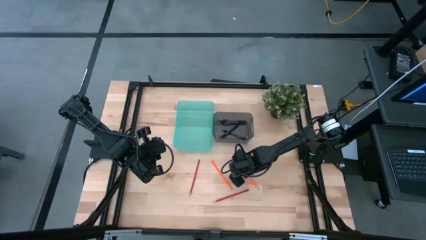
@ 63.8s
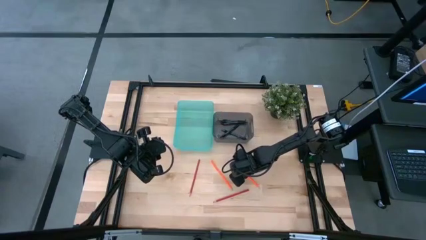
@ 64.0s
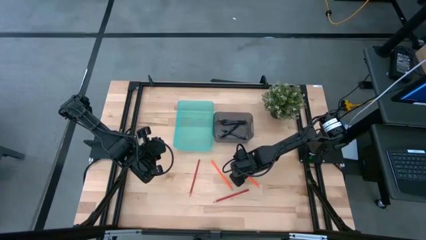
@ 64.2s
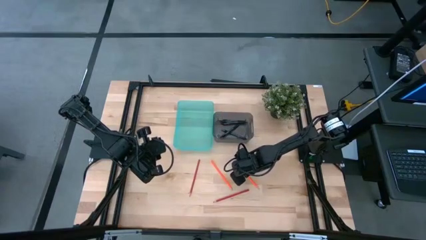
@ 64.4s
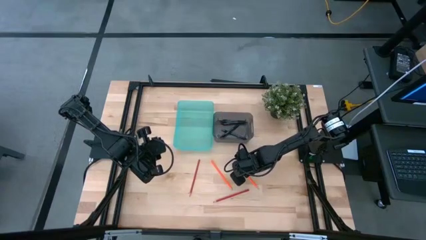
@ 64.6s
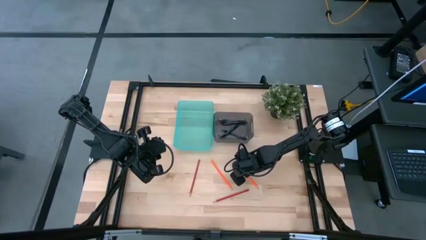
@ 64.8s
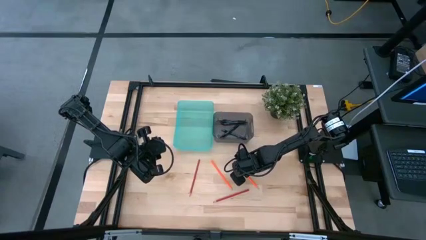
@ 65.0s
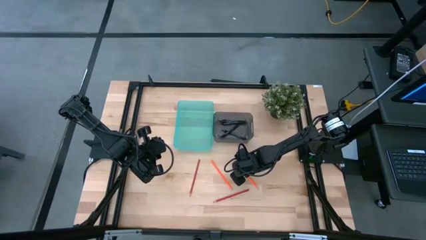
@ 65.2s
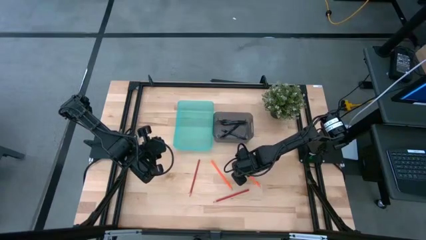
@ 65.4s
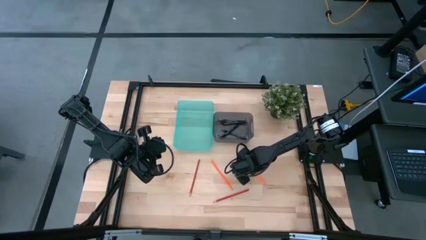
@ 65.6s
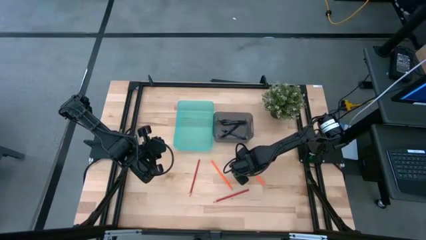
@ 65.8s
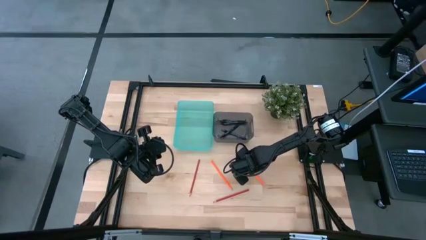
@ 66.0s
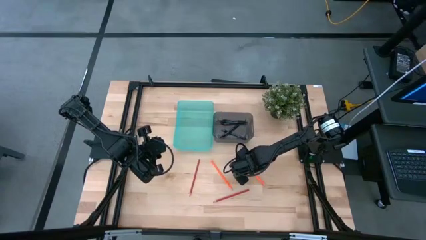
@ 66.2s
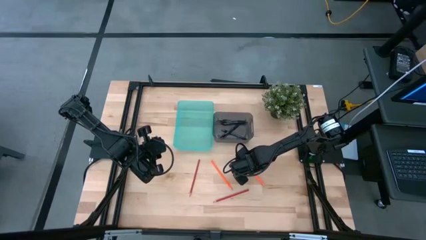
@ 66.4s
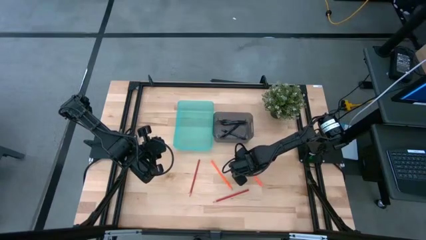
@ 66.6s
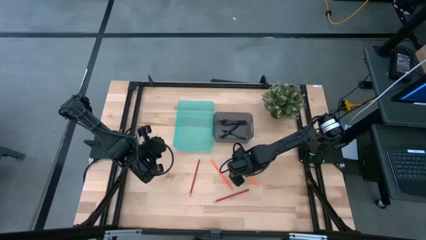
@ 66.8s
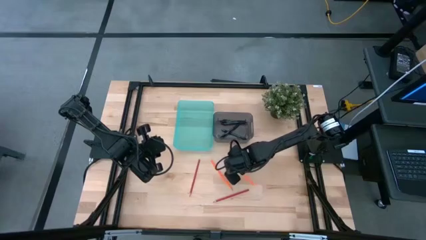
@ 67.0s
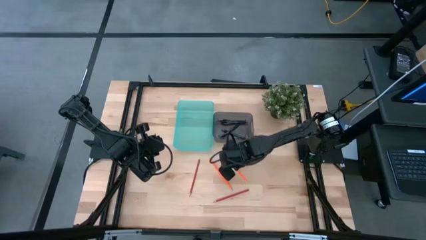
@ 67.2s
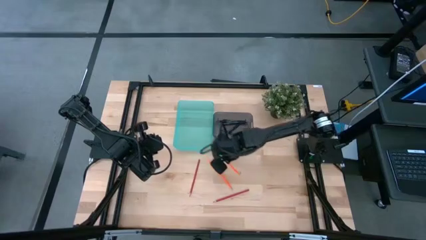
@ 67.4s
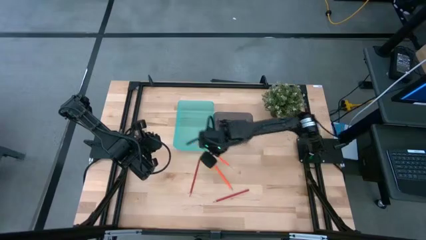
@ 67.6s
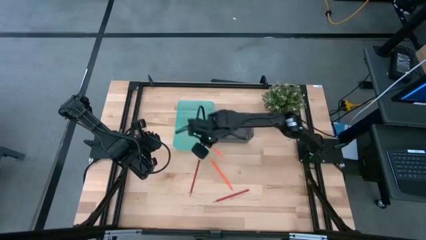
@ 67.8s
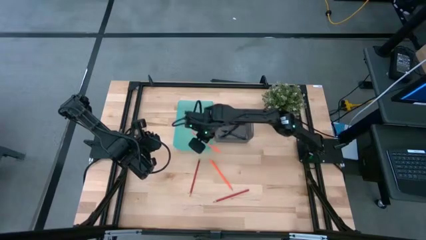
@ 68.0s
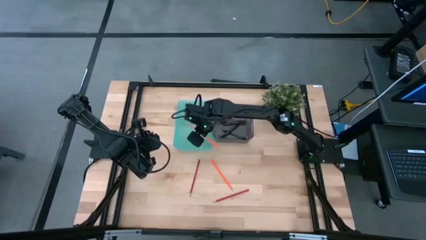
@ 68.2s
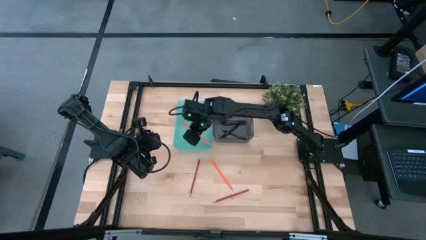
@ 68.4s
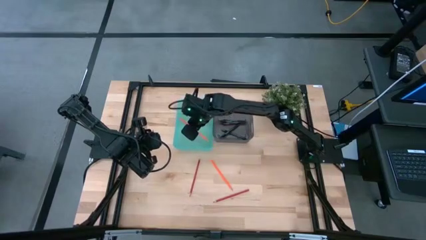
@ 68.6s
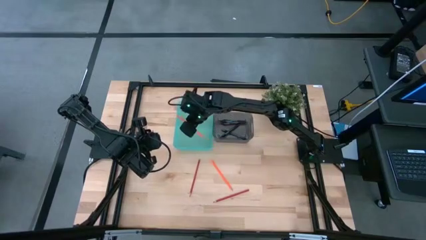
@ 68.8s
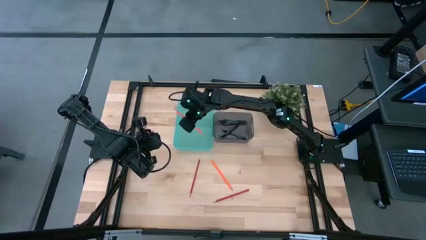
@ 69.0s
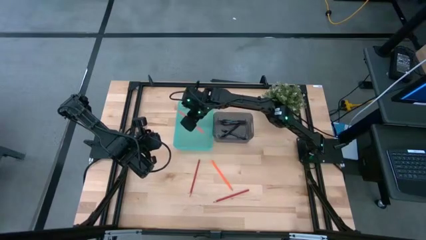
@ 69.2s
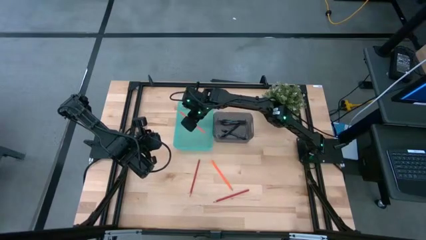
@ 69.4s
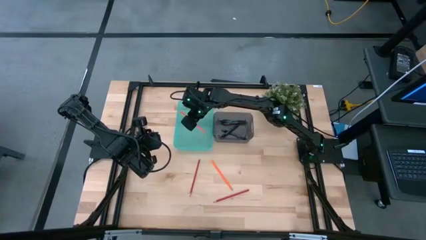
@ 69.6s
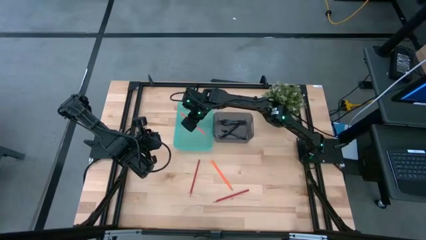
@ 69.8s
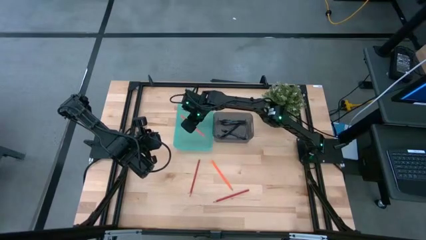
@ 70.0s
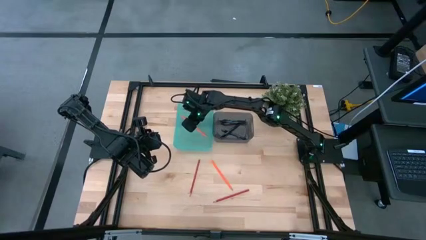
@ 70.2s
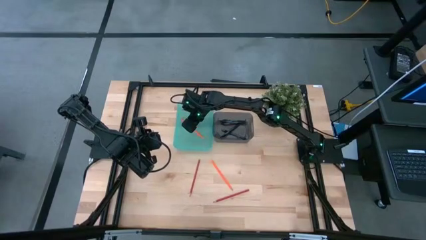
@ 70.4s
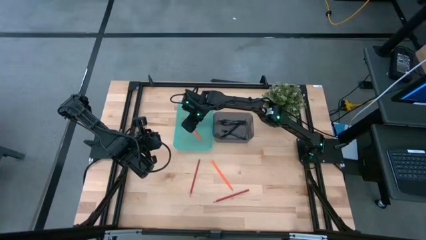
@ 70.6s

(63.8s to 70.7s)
Task: Sort pens & pencils
Put the right orange colored pencil into the green bin

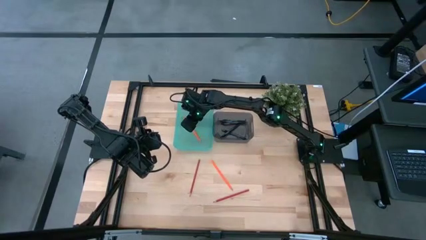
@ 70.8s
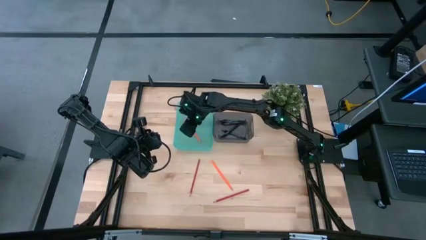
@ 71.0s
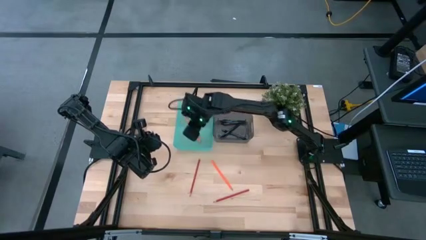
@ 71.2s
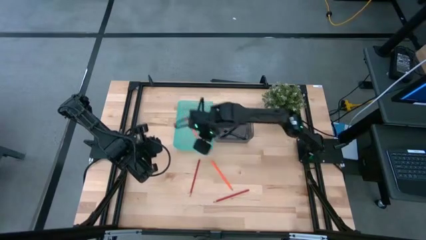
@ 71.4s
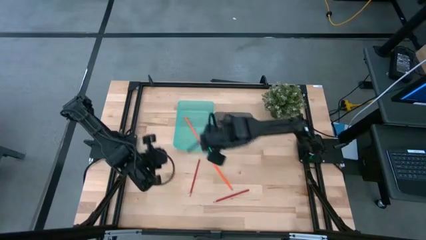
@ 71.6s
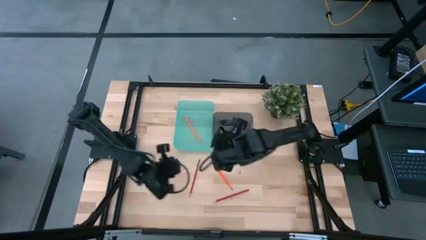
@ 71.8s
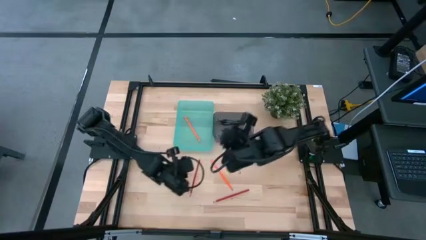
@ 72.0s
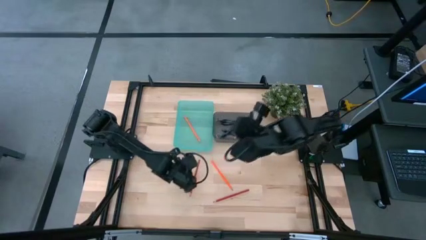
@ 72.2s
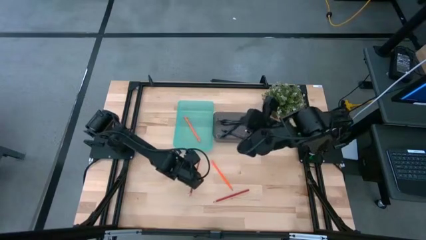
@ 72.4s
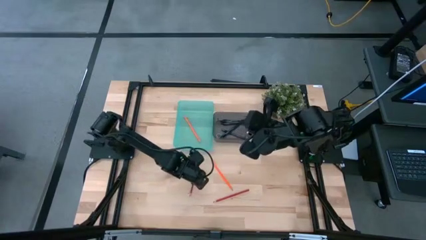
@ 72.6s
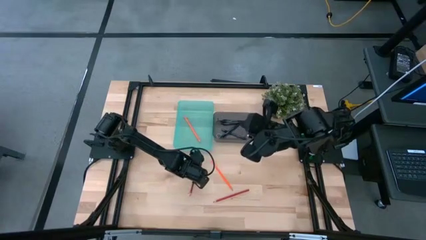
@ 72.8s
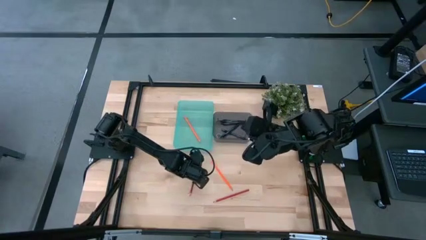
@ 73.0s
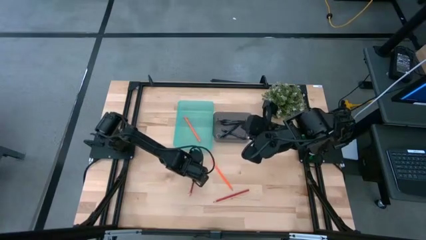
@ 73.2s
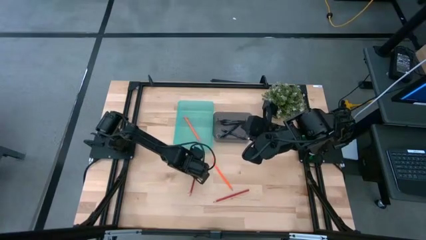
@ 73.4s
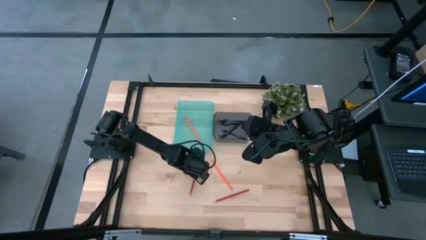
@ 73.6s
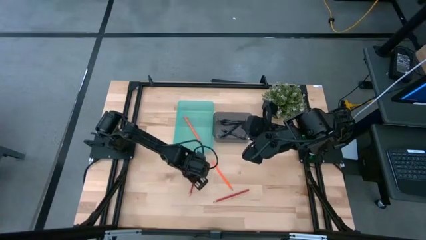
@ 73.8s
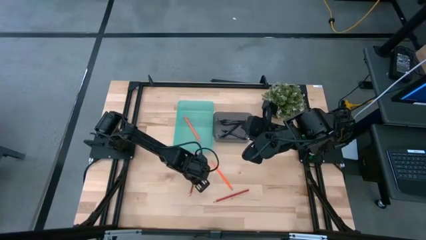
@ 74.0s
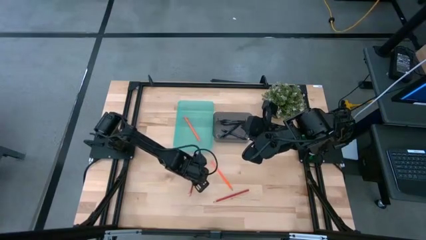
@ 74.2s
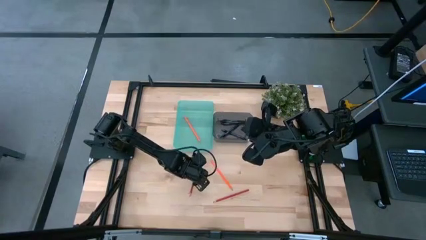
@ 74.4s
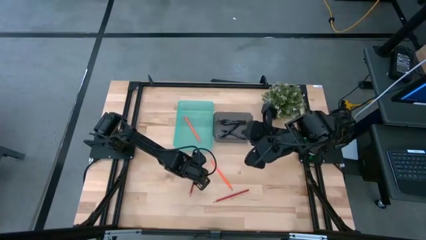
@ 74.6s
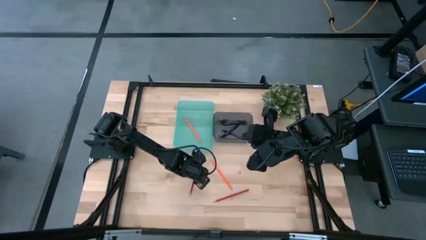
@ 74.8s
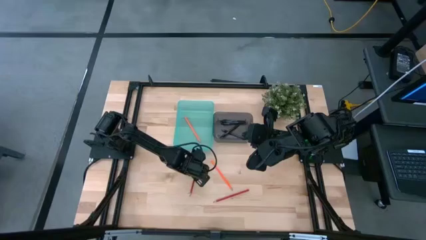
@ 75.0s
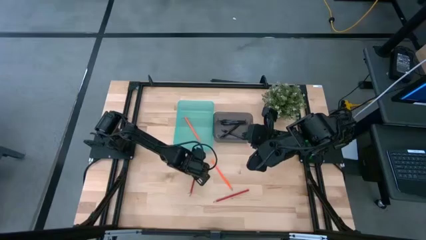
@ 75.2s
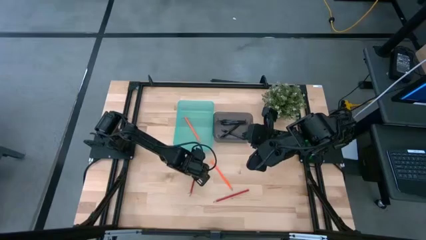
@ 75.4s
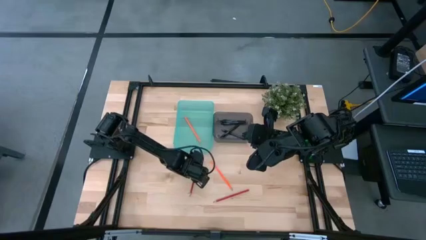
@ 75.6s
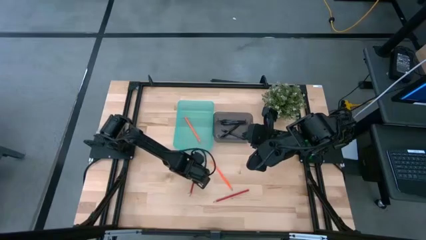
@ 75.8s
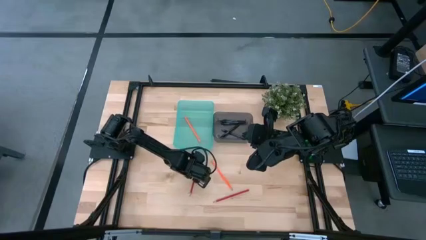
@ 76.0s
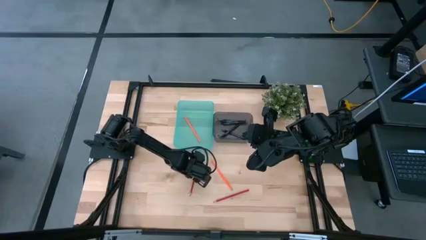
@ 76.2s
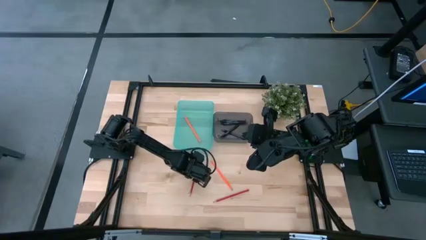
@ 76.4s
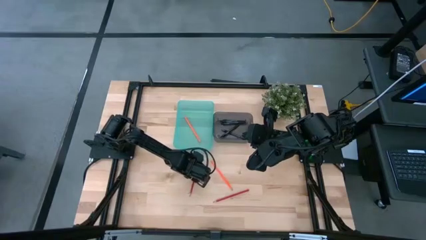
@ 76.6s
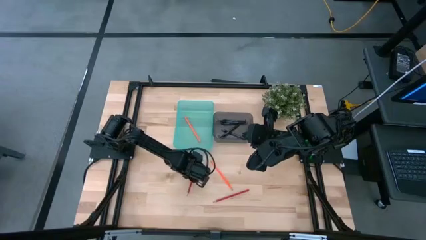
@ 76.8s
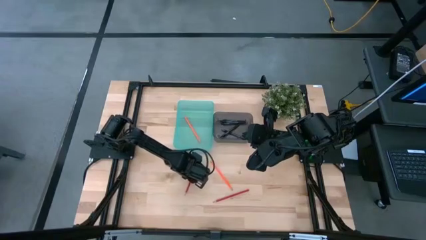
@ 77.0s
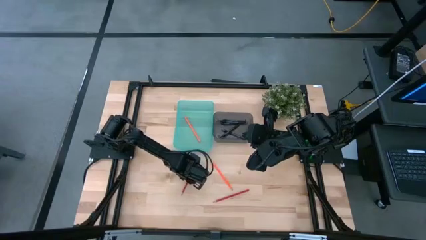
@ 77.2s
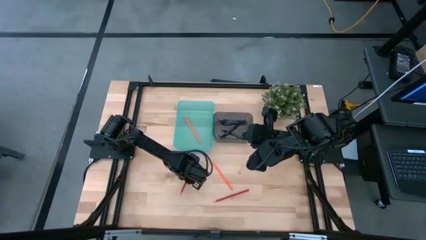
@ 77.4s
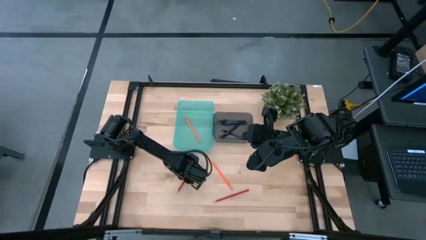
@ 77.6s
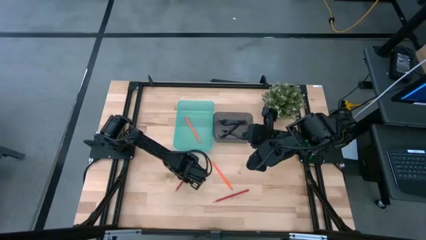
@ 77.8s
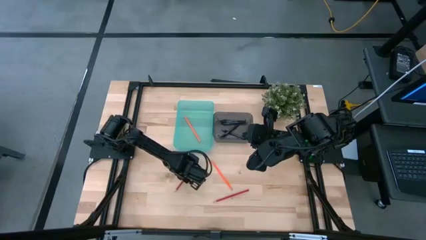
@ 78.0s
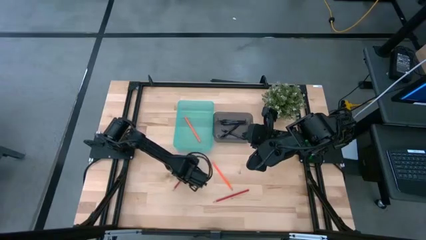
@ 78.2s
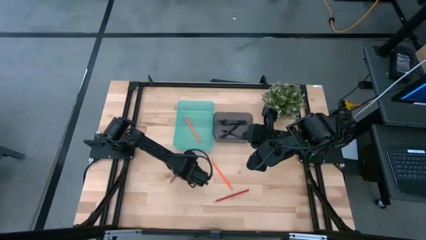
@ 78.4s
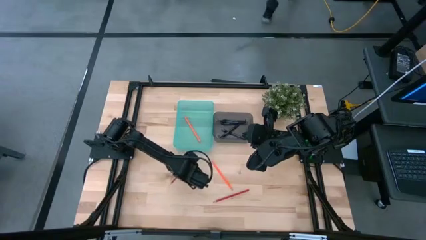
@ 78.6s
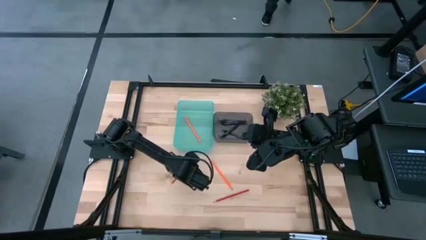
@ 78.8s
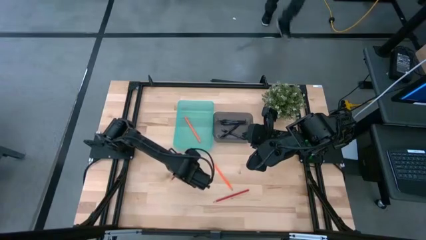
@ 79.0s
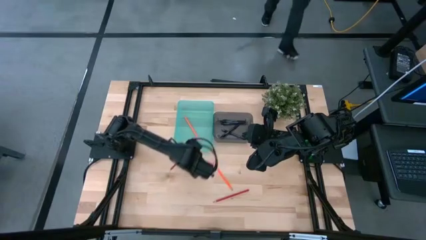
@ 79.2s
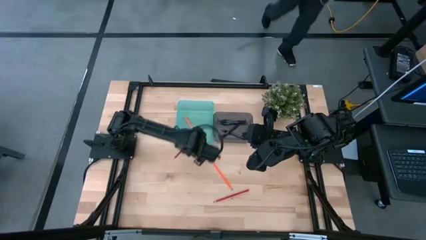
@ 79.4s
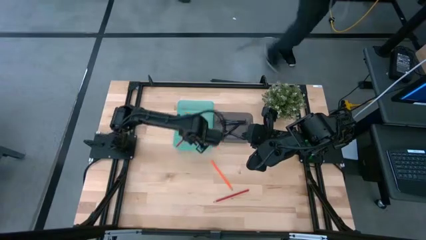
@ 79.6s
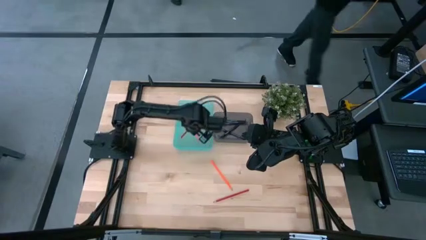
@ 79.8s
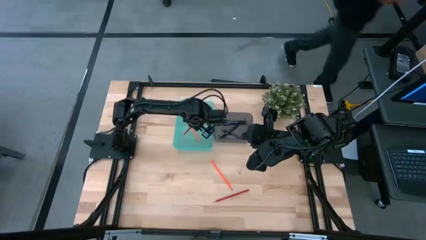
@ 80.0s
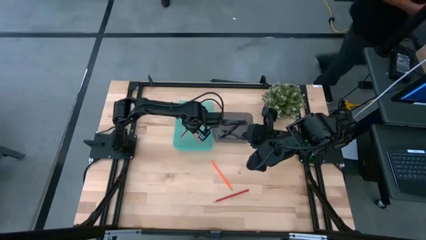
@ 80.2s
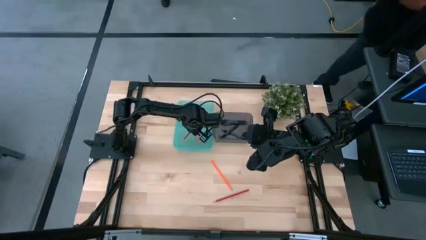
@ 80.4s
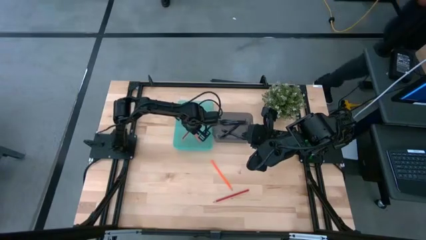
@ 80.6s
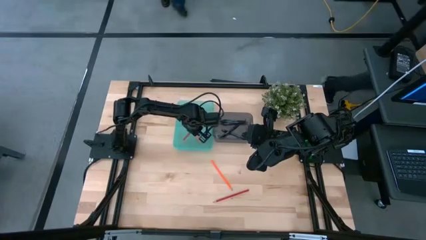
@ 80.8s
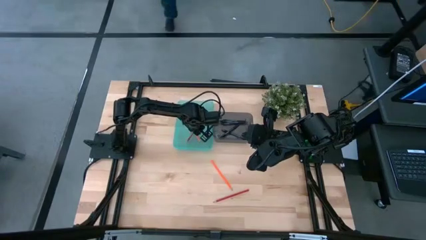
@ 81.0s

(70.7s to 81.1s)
Put the left red colored pencil into the green bin
